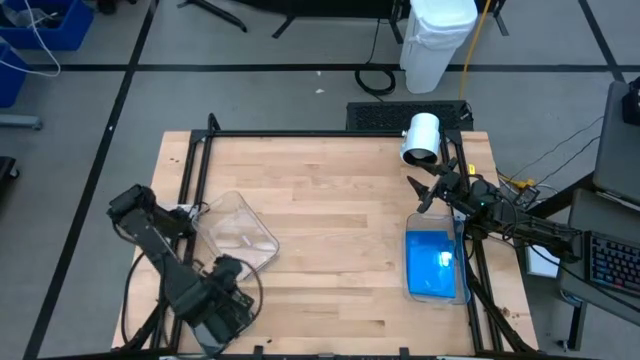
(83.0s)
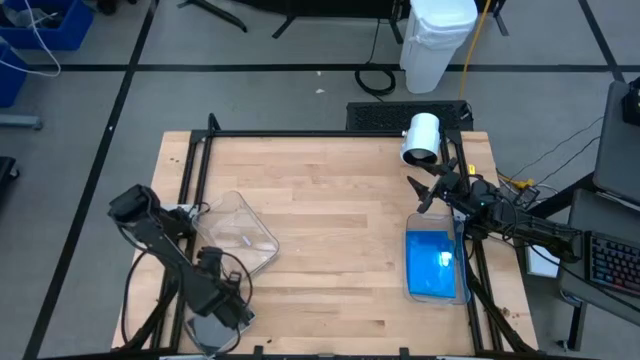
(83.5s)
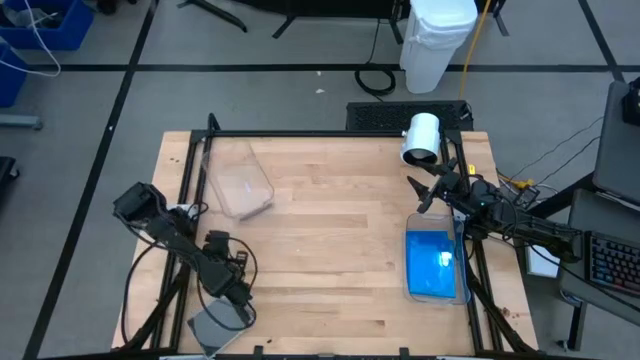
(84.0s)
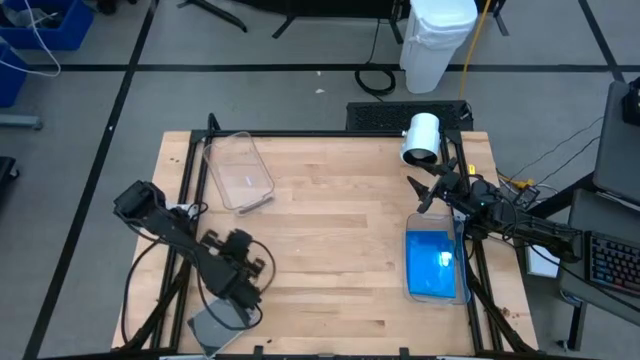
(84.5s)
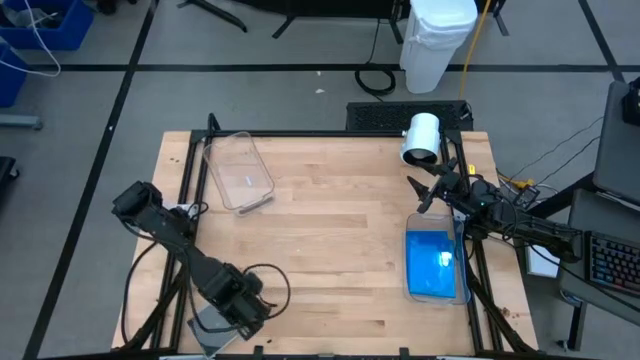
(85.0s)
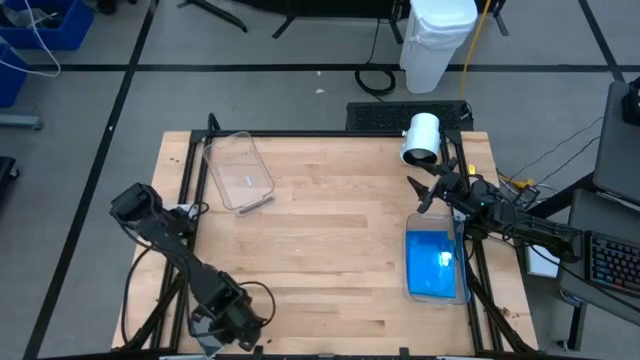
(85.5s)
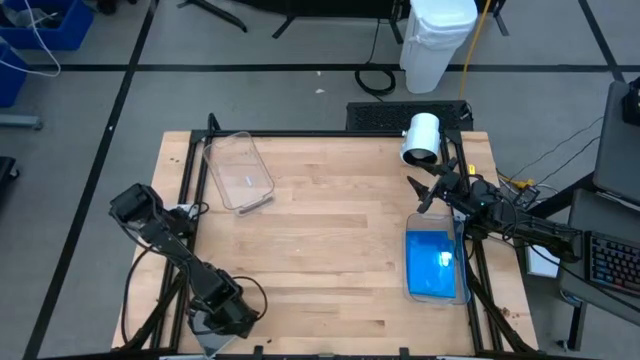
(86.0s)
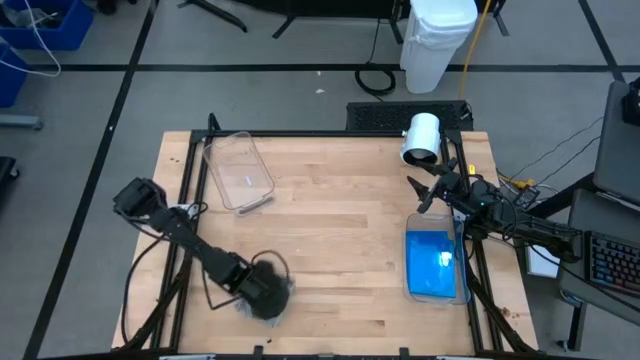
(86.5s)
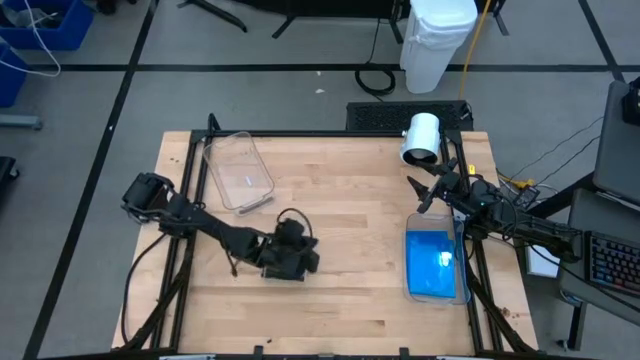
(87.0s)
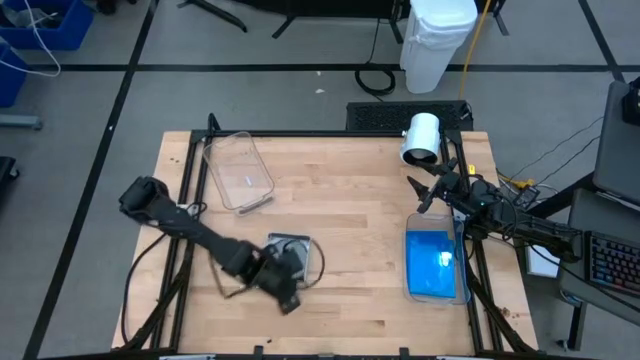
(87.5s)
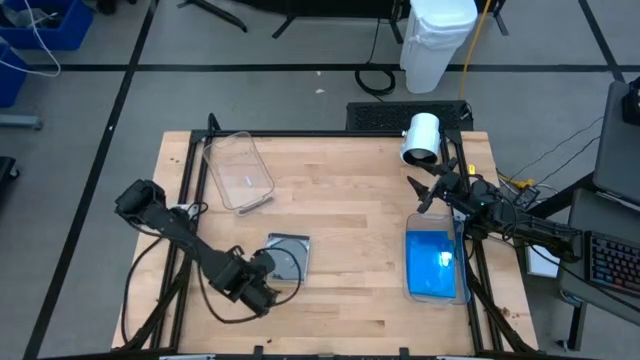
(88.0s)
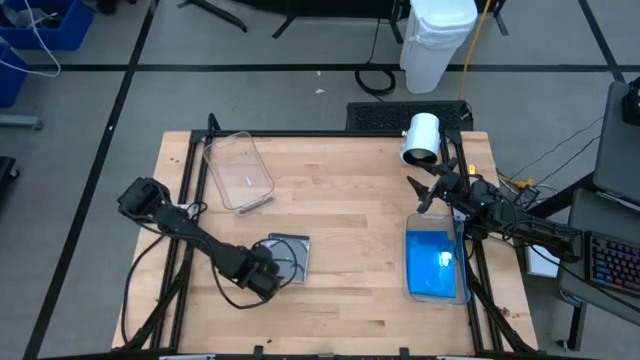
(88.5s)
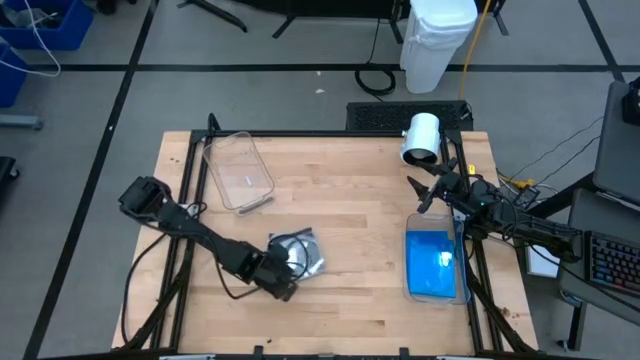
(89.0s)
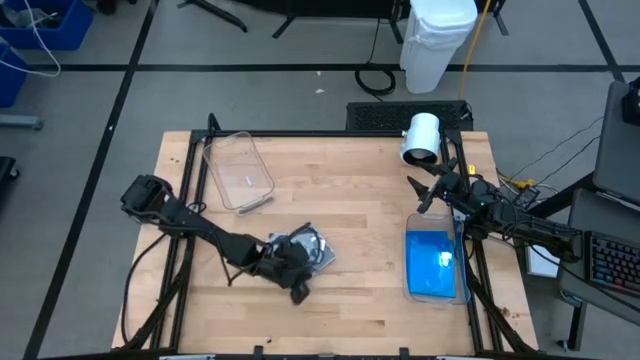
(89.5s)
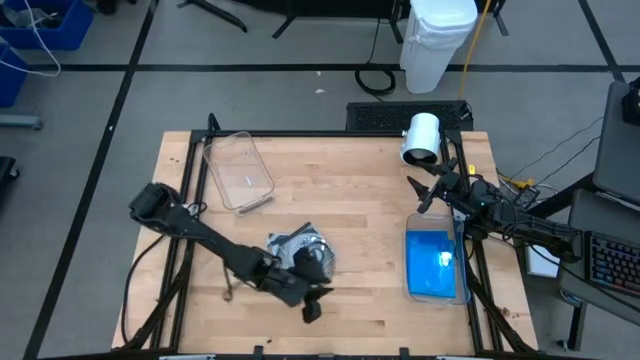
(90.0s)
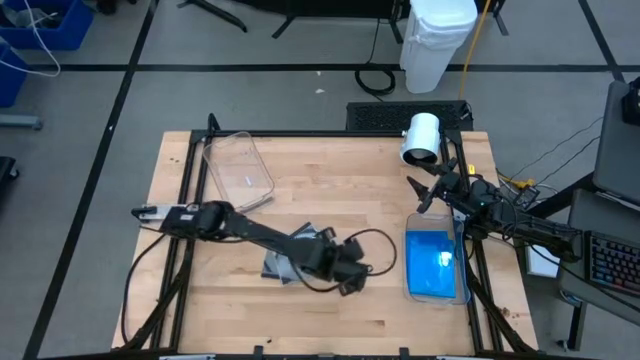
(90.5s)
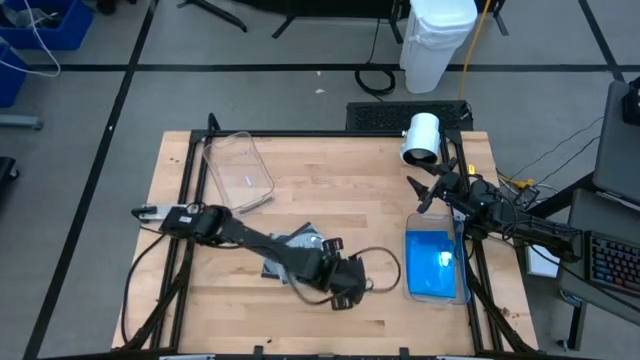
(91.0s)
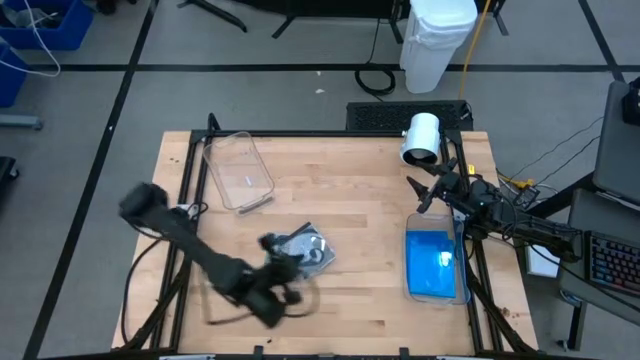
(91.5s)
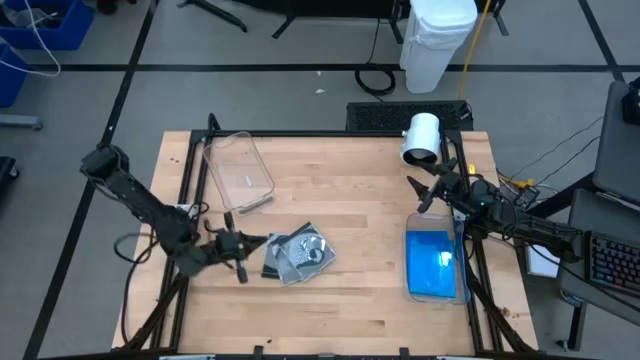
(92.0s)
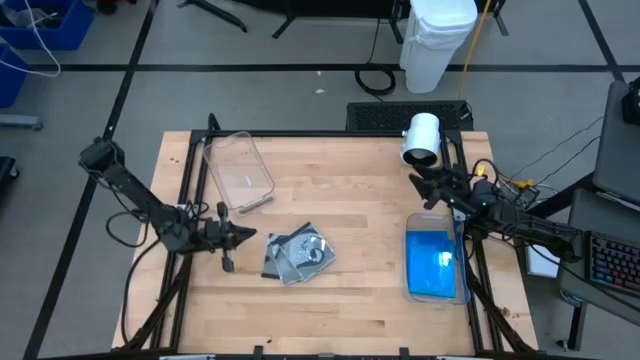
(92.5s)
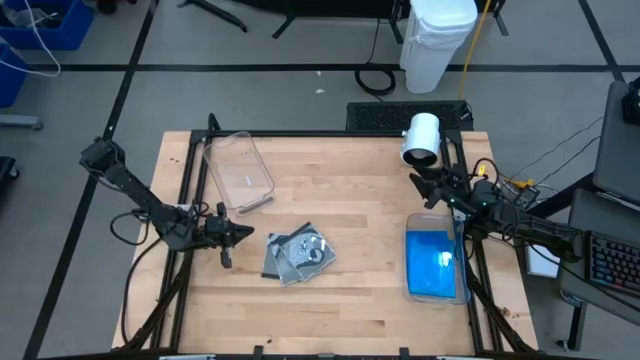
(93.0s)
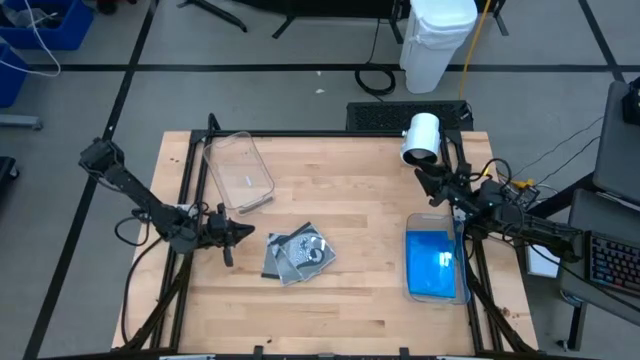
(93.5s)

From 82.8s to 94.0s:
Task: Pick & place jewel cases by type
Adjust the black disc cases

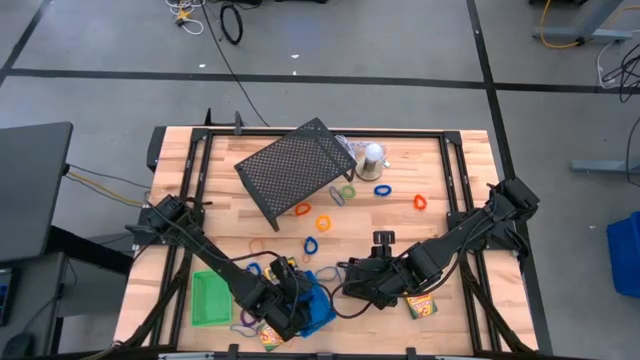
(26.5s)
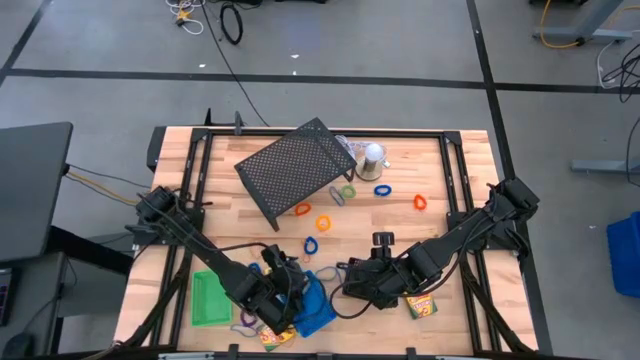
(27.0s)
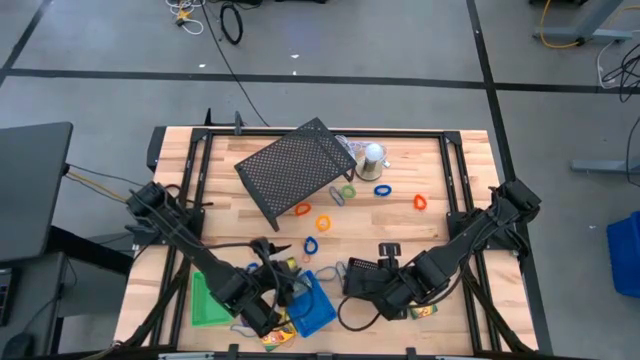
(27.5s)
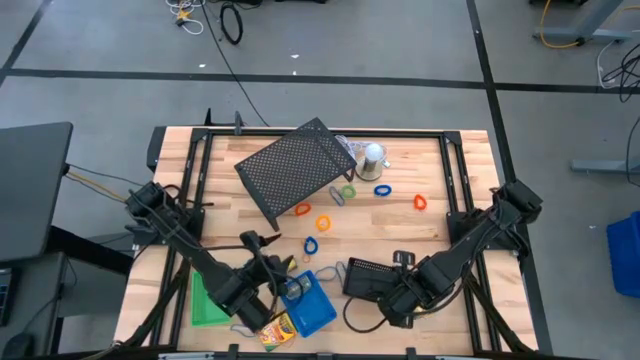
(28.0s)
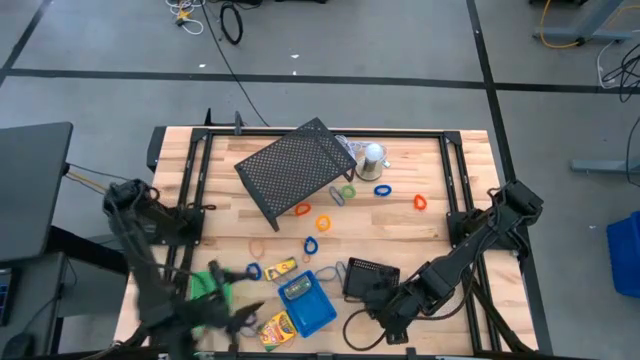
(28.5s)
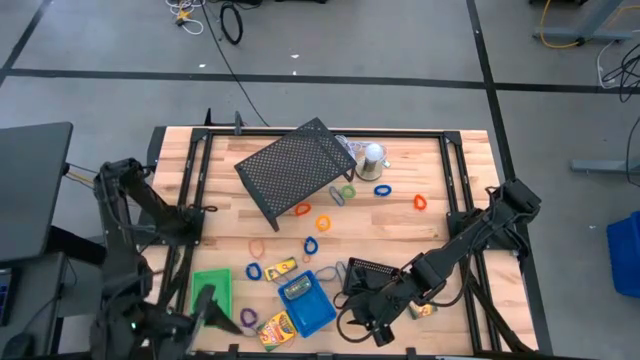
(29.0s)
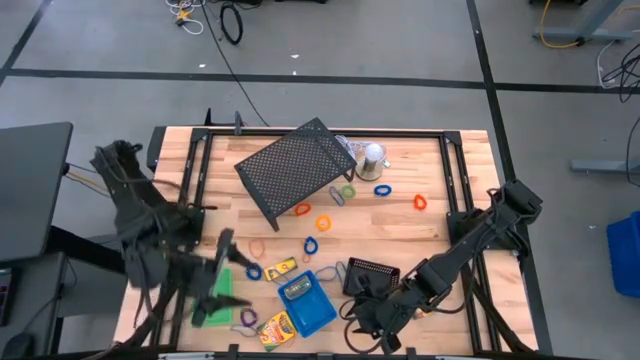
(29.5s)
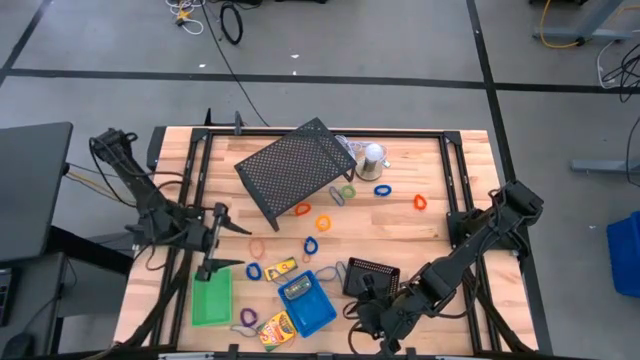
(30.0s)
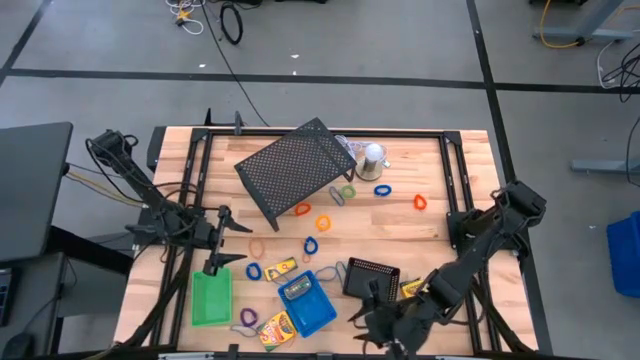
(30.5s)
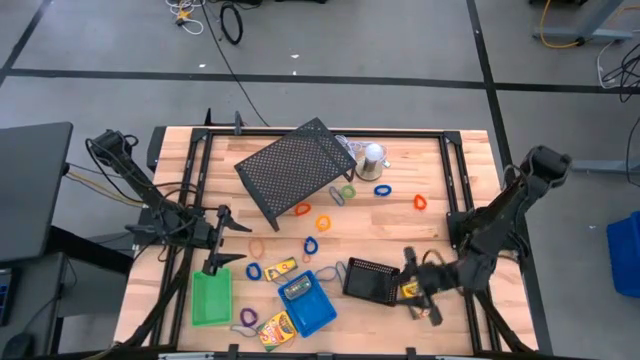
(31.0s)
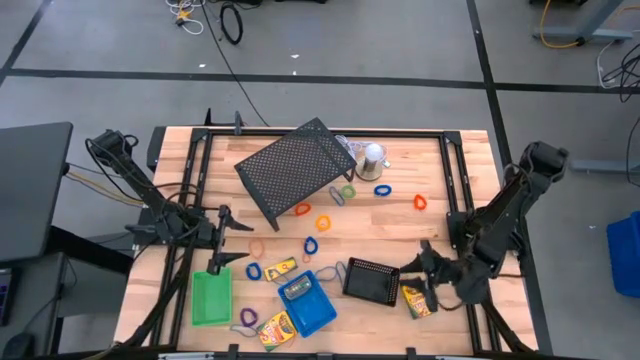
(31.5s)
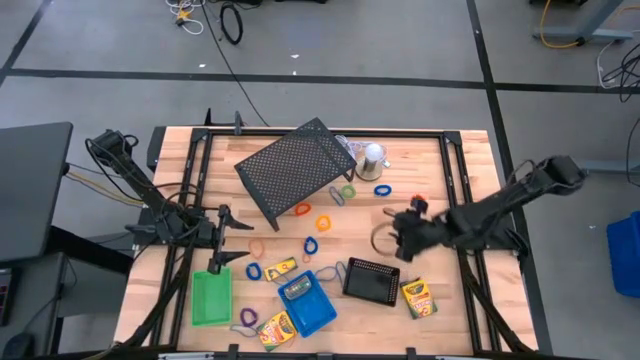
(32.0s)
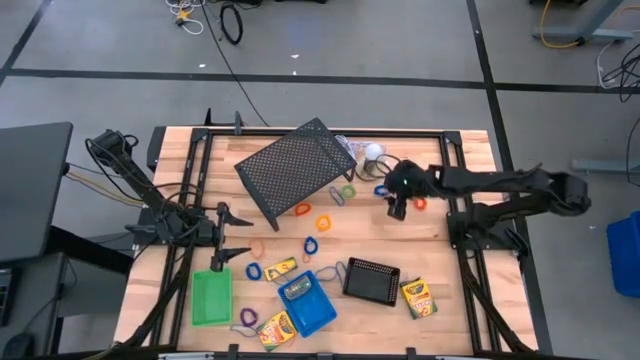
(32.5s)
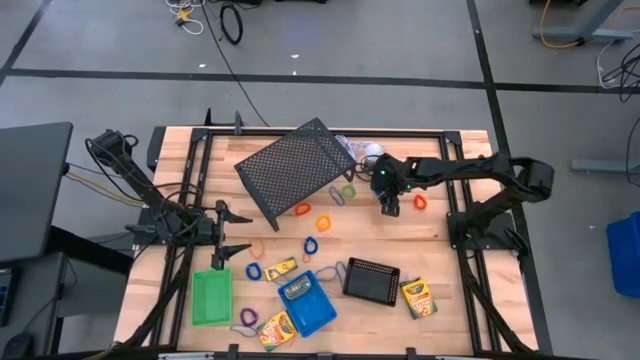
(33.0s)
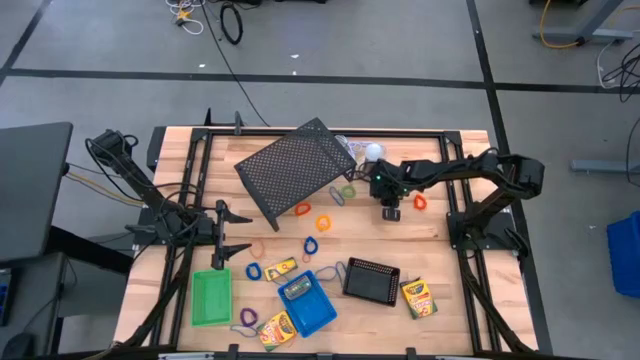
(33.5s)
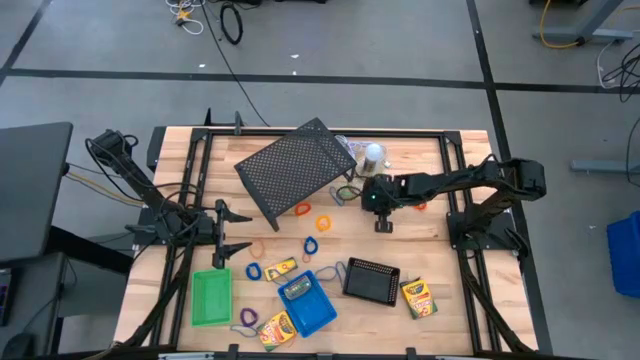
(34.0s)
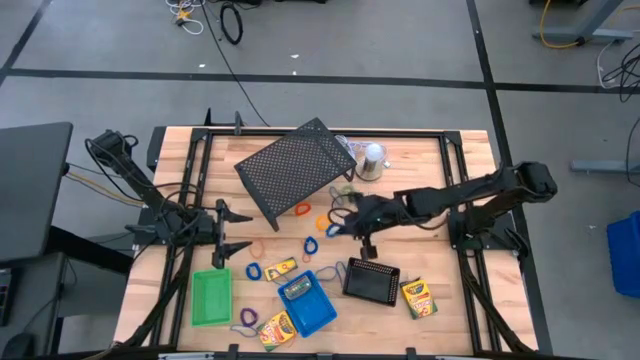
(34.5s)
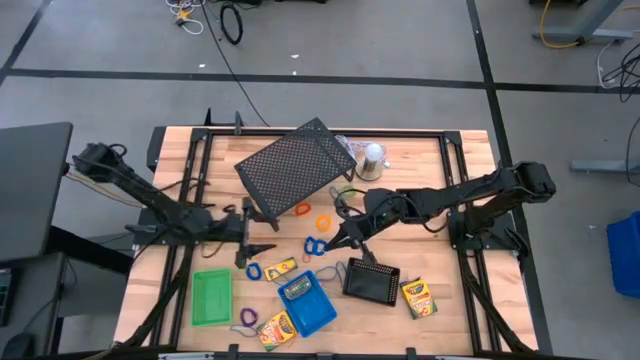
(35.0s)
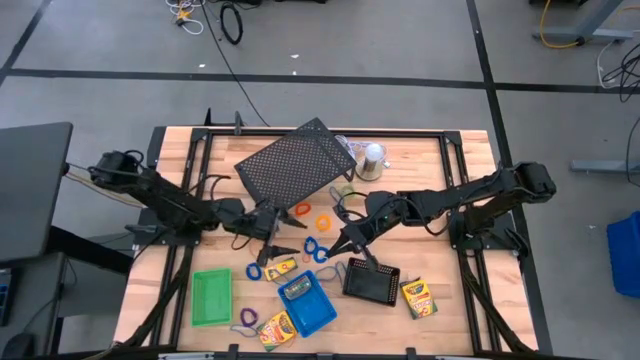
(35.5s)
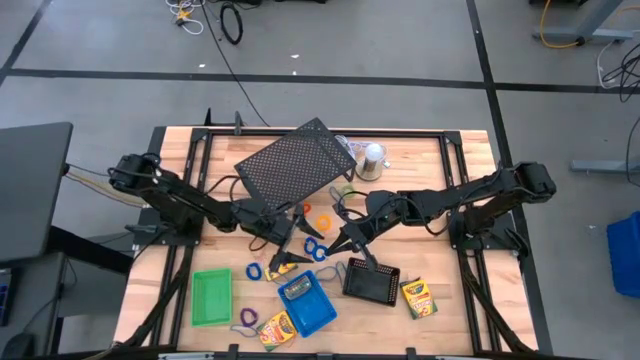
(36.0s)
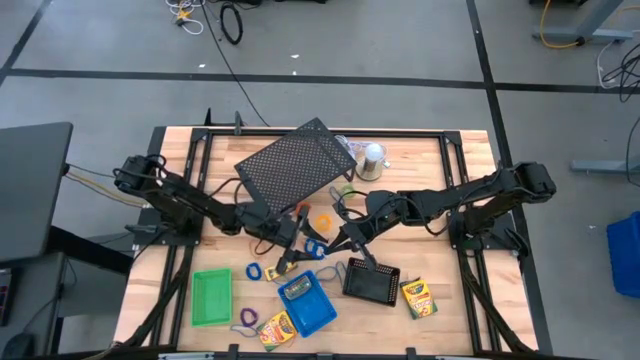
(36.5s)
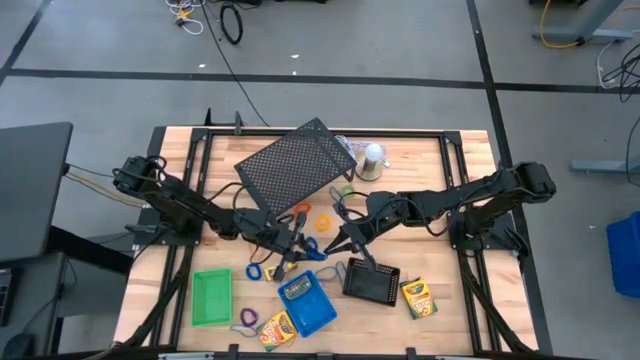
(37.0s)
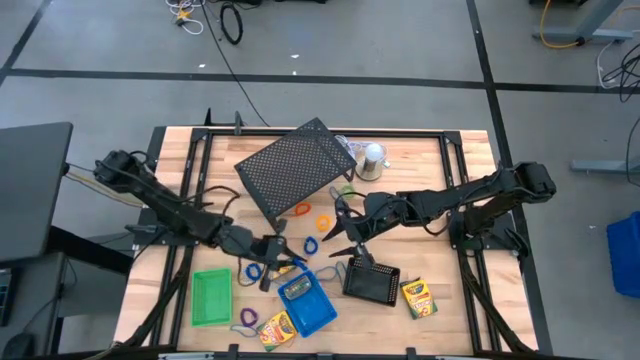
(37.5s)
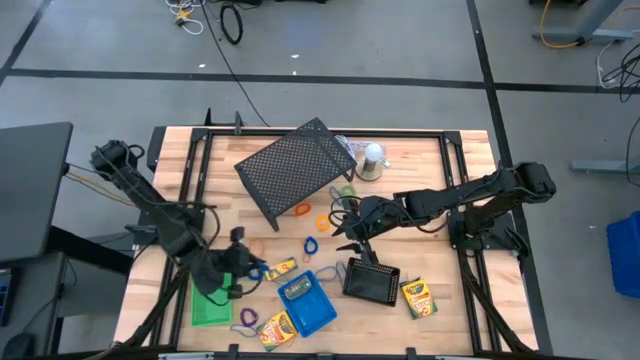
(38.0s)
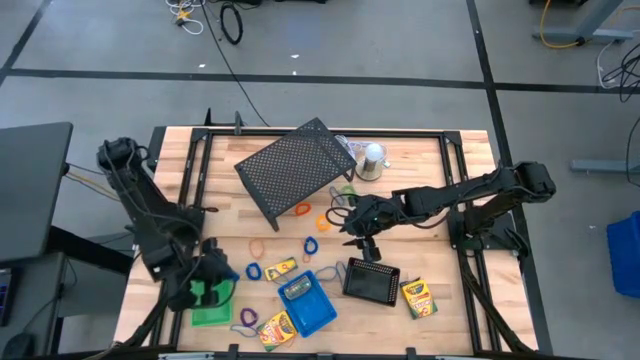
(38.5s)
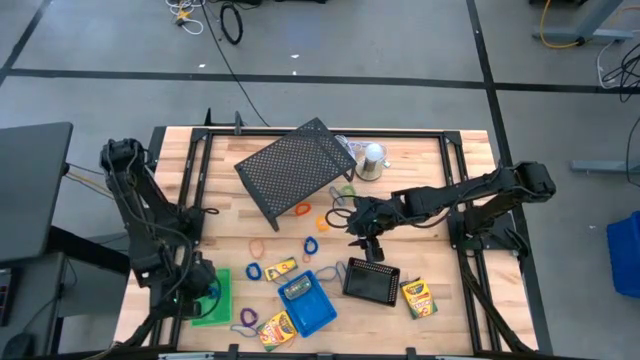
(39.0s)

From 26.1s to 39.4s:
Task: Pick & Place Office Desk Supplies
Put the blue spiral keychain into the green bin
